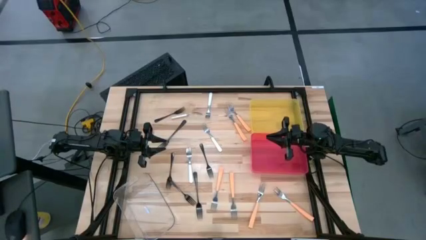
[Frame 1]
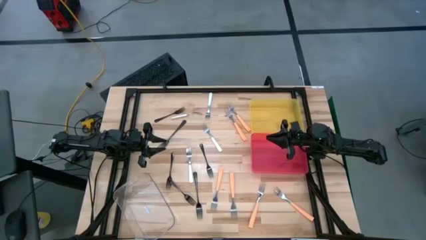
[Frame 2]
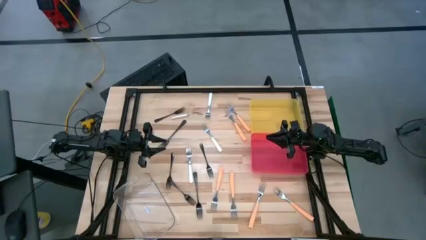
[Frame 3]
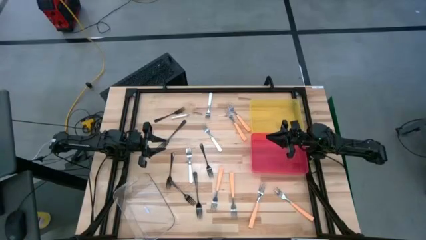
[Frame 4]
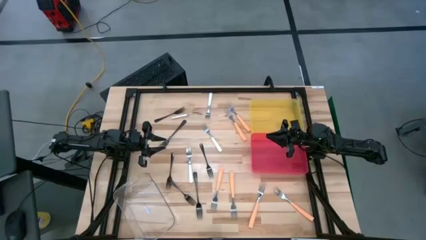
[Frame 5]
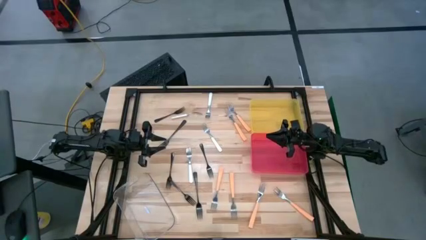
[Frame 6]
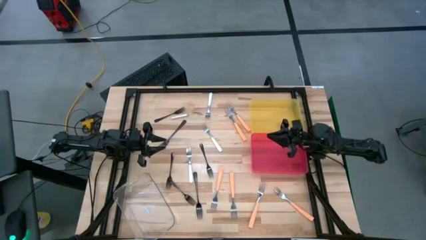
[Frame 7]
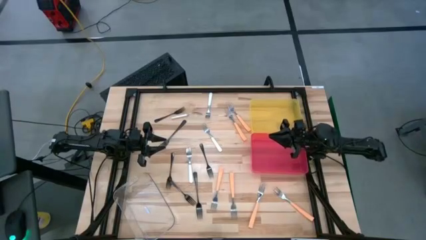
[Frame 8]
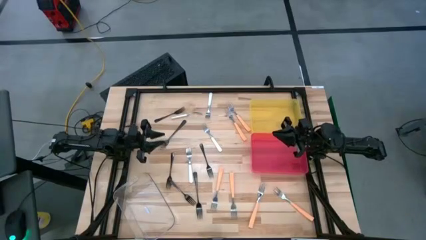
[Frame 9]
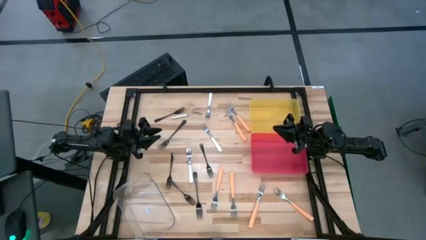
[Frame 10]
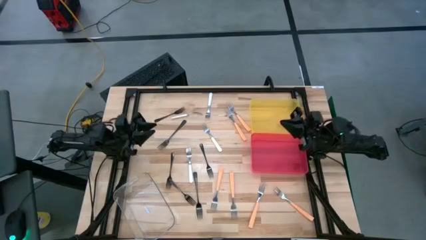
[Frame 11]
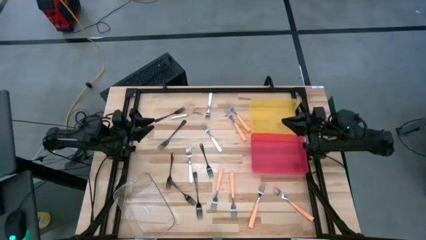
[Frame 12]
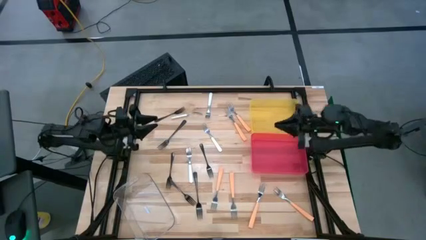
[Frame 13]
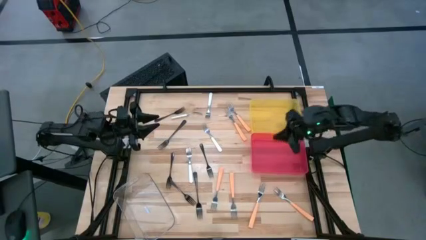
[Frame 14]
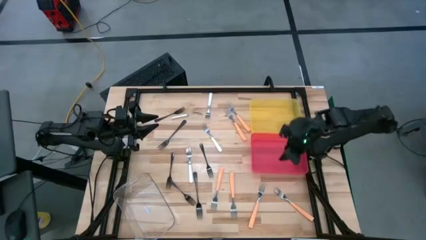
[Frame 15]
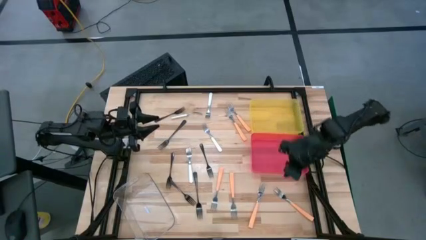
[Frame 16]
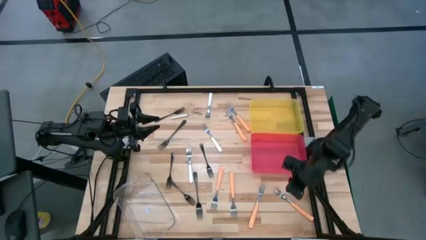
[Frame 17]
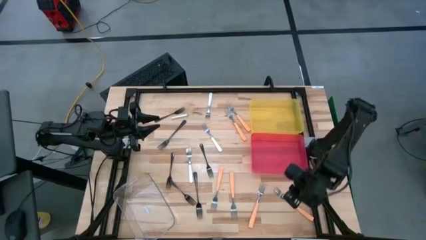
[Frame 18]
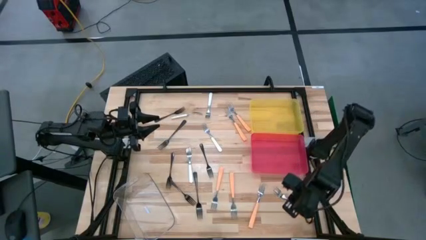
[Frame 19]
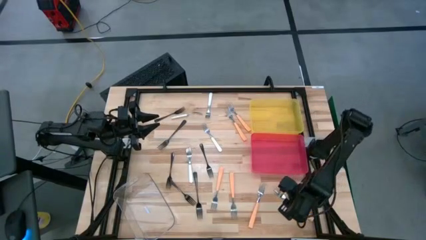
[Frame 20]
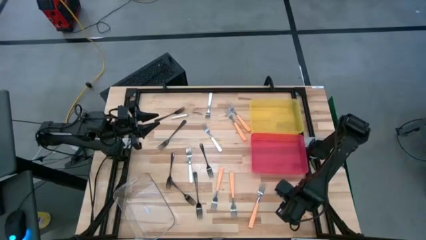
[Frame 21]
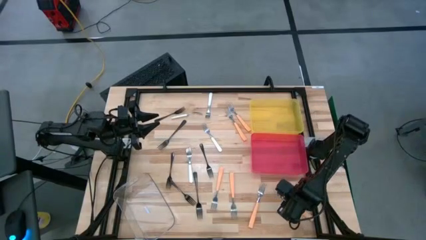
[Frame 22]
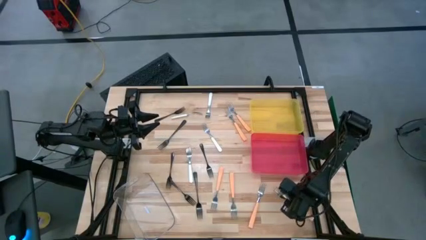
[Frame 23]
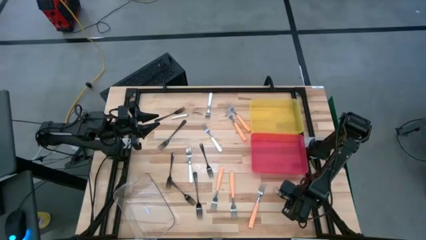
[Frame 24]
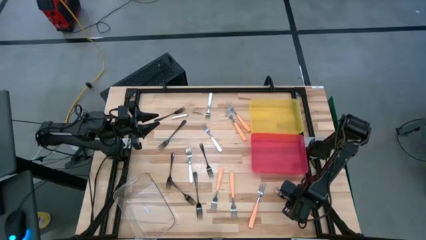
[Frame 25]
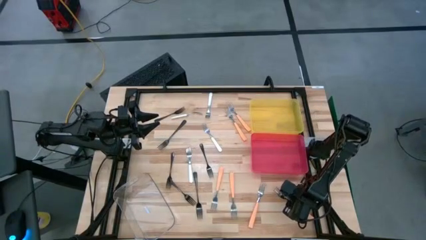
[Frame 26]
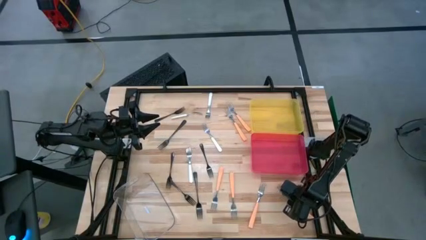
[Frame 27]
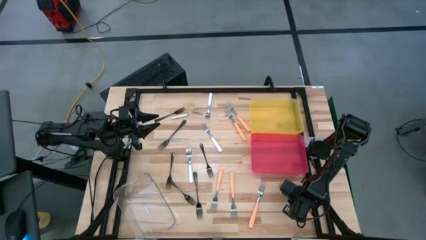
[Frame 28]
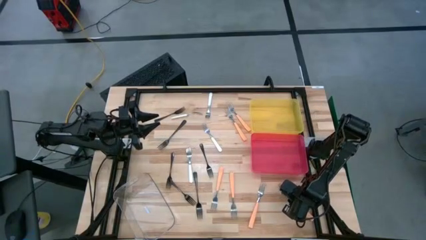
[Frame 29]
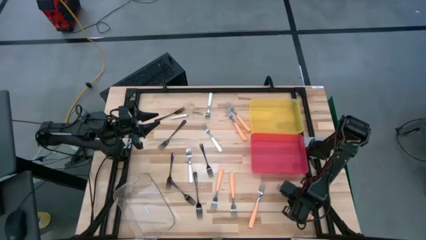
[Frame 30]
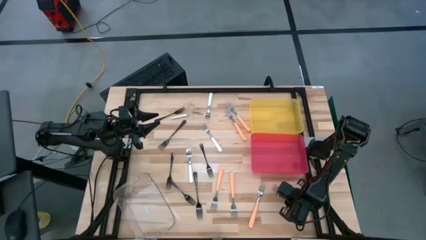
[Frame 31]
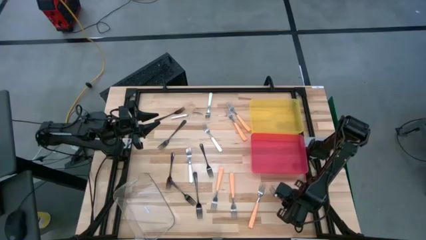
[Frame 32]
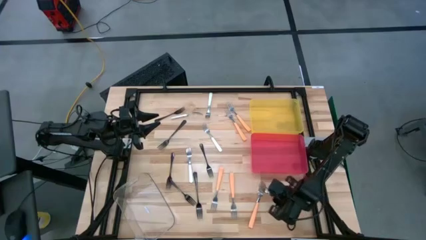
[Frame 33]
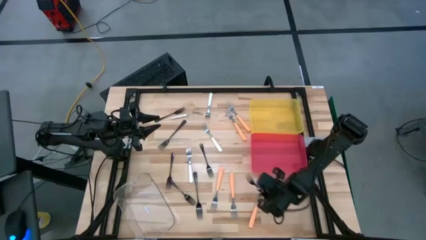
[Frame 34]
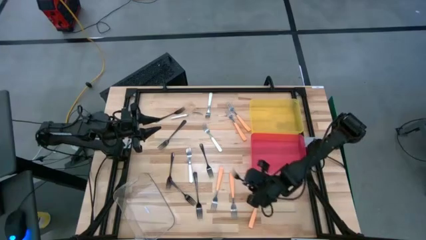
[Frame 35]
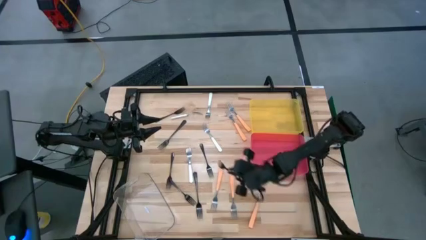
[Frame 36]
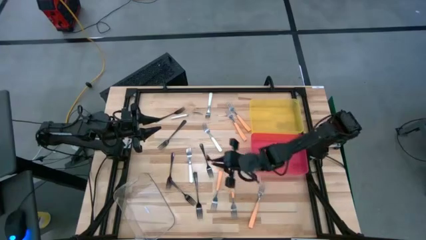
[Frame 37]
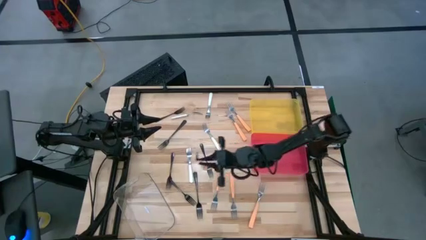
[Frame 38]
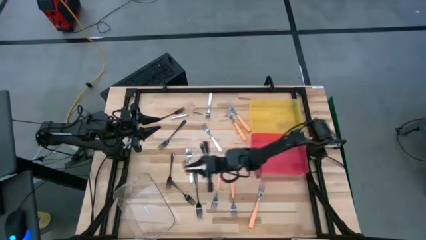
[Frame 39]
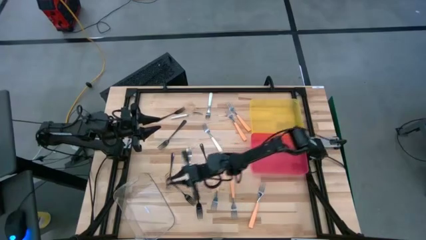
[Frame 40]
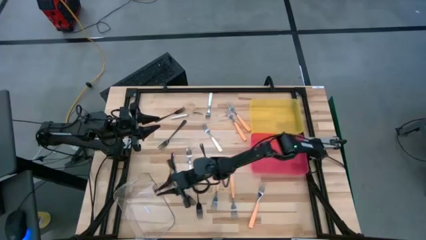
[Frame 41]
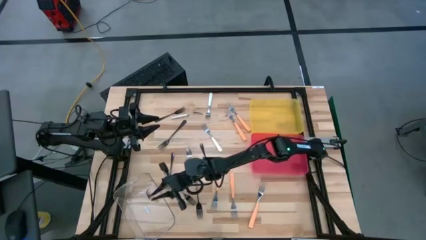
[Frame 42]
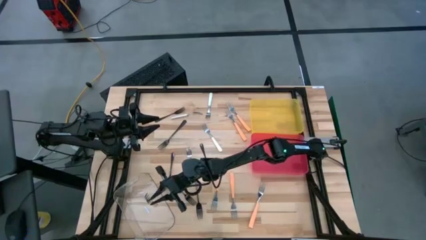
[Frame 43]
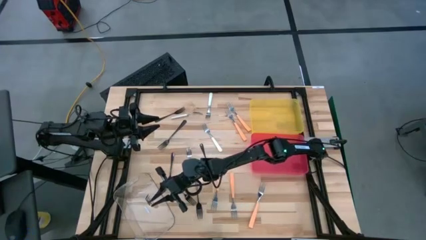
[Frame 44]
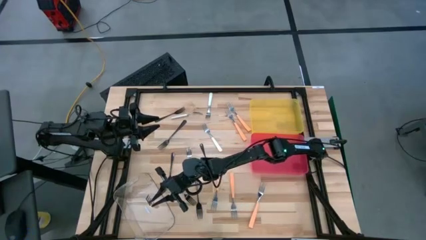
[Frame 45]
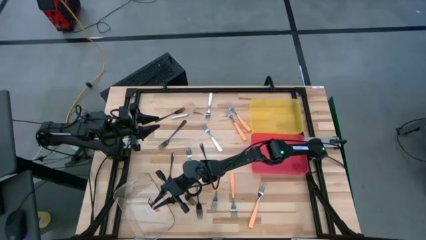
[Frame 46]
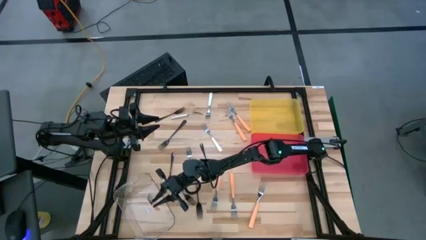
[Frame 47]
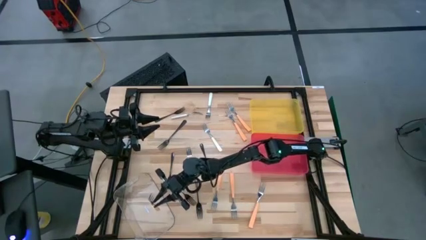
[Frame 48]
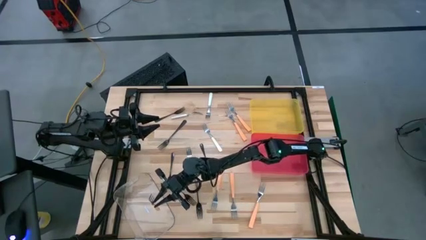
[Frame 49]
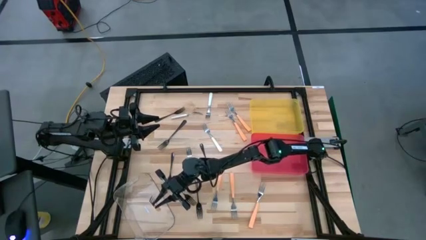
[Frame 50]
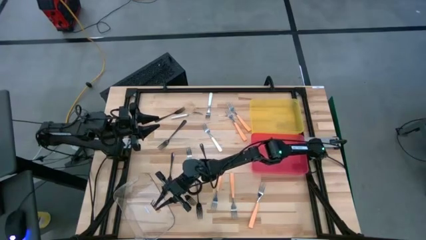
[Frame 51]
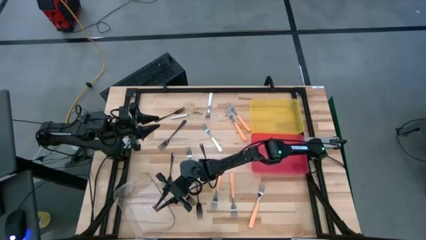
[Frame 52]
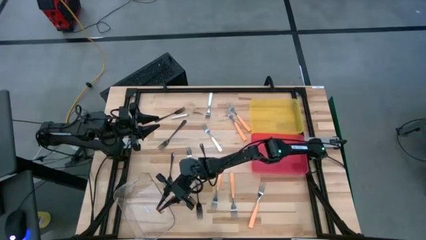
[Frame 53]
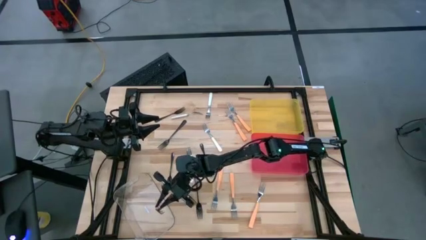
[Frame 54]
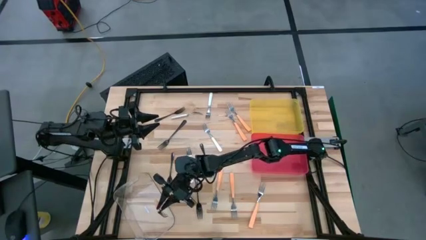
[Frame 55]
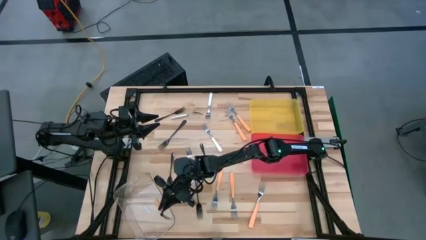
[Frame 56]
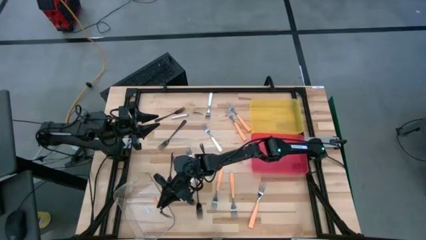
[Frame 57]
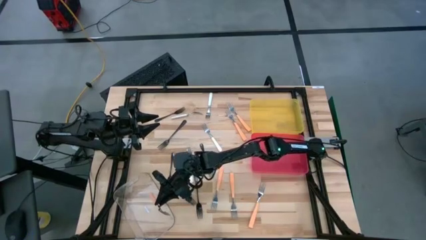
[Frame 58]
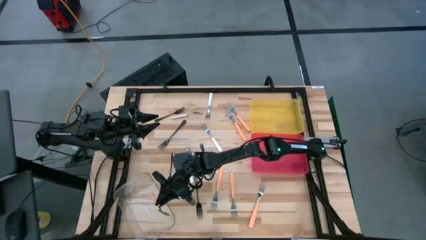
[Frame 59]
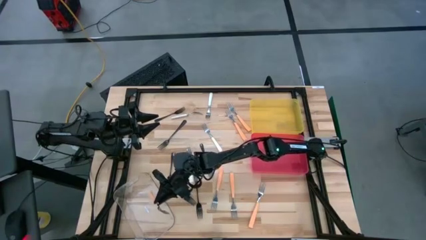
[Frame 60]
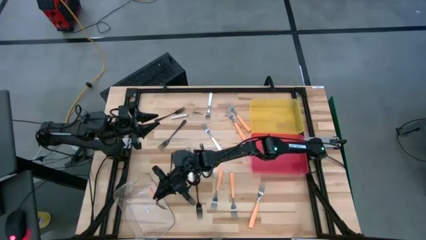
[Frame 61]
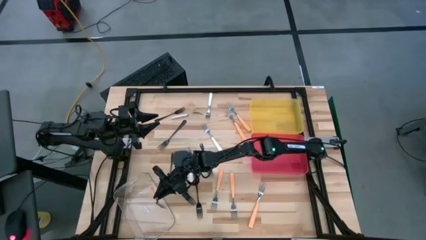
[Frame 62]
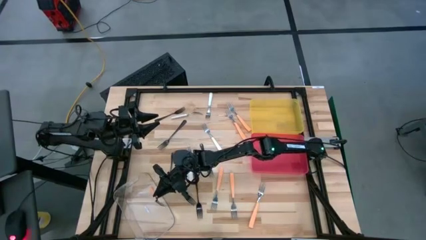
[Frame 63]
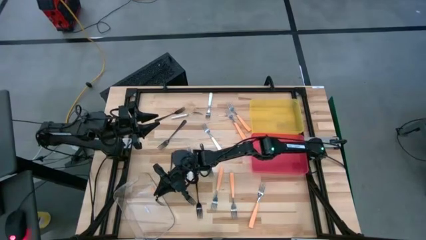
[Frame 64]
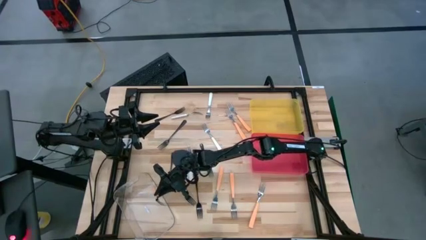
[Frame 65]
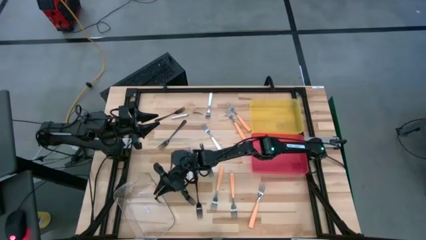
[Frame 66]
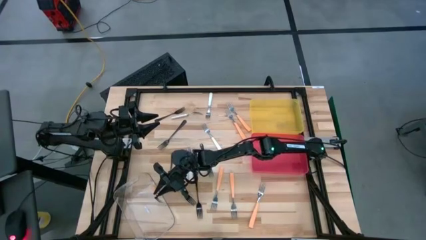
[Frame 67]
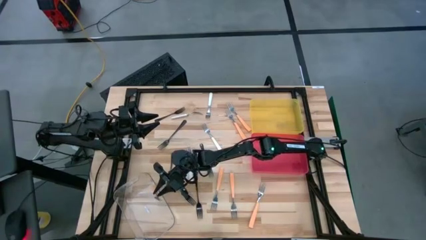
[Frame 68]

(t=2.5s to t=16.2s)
Task: Sort silverware by color (type)
Put the orange fork into the transparent bin
